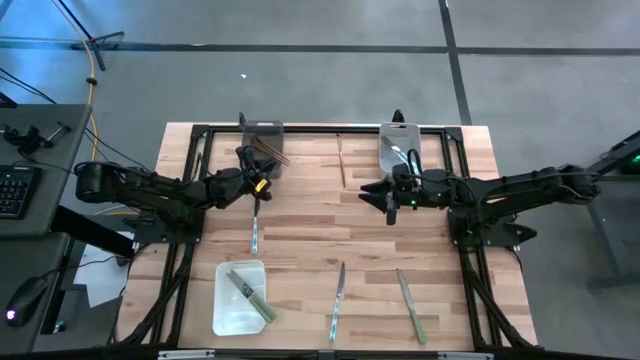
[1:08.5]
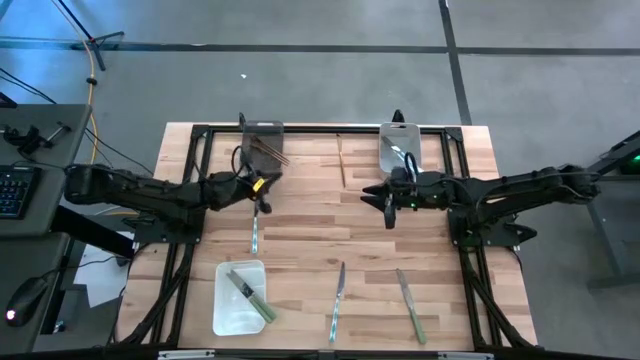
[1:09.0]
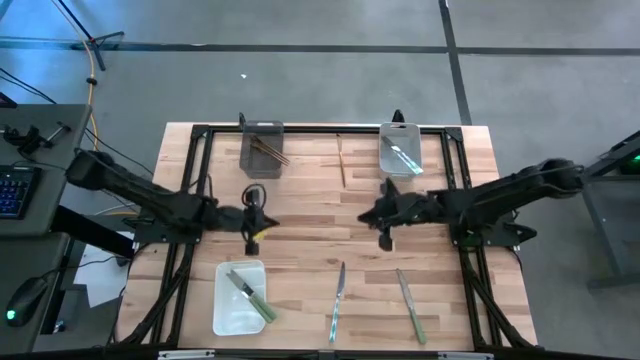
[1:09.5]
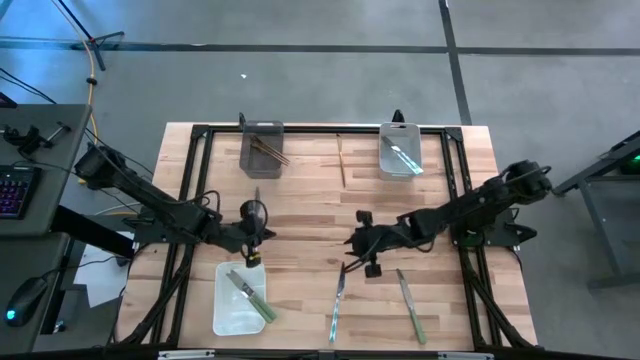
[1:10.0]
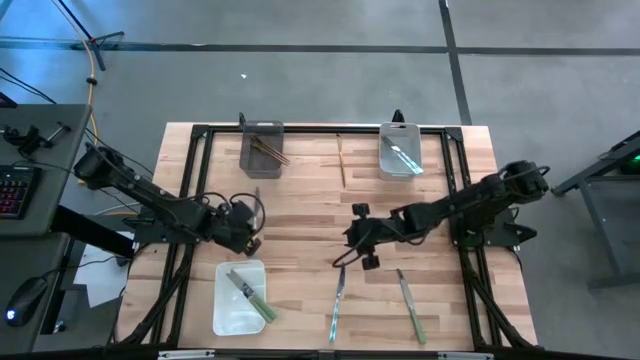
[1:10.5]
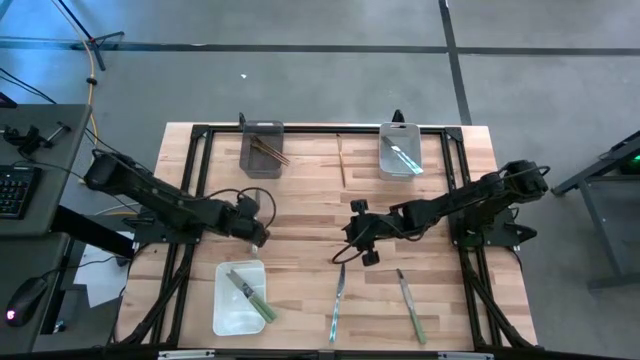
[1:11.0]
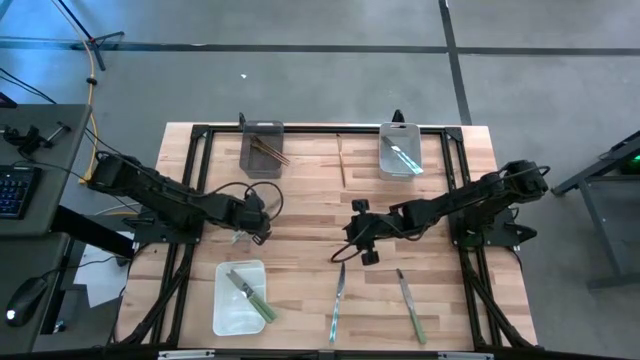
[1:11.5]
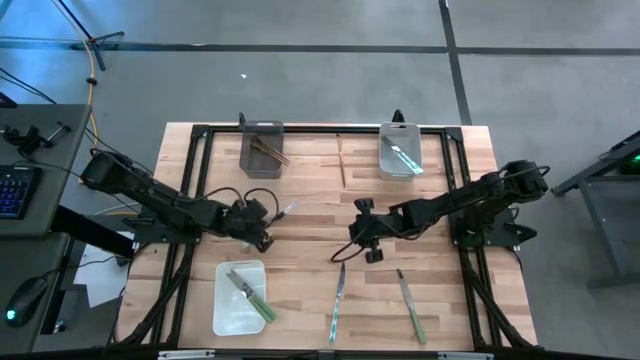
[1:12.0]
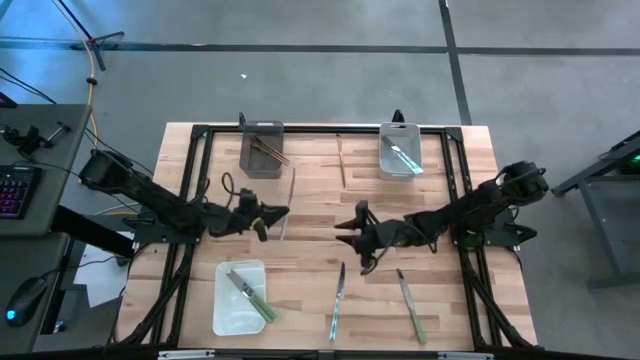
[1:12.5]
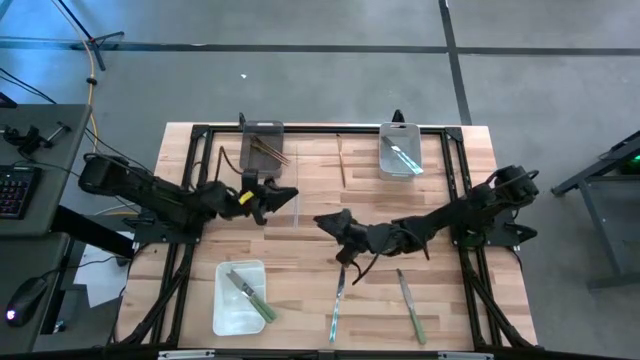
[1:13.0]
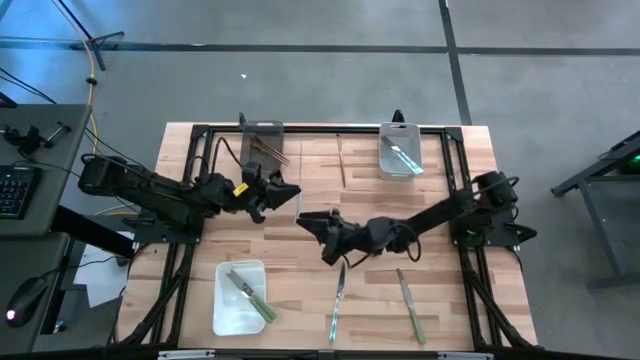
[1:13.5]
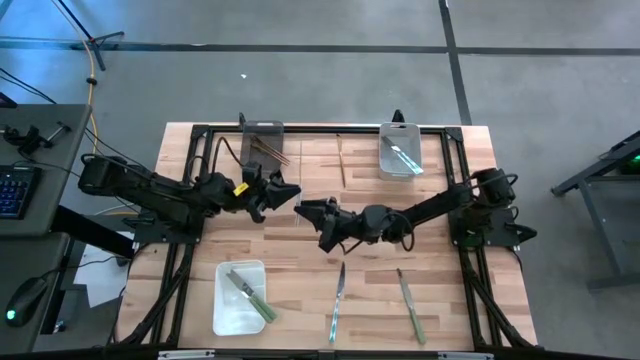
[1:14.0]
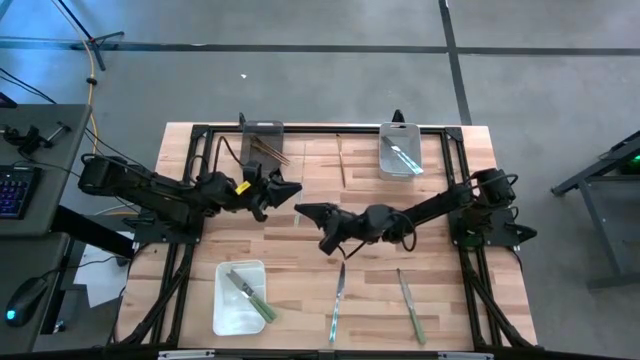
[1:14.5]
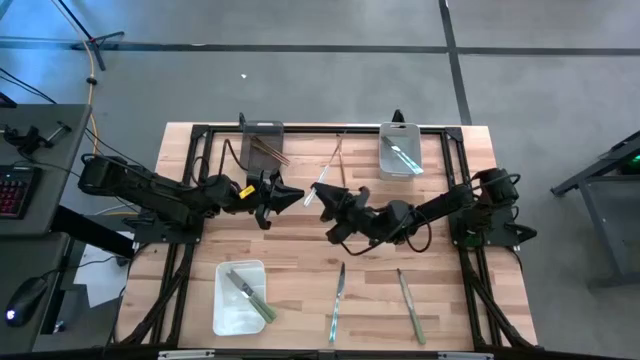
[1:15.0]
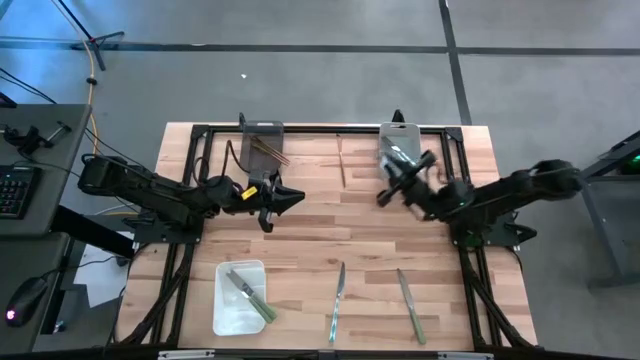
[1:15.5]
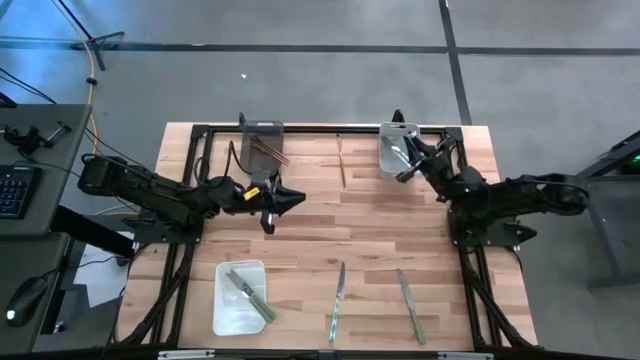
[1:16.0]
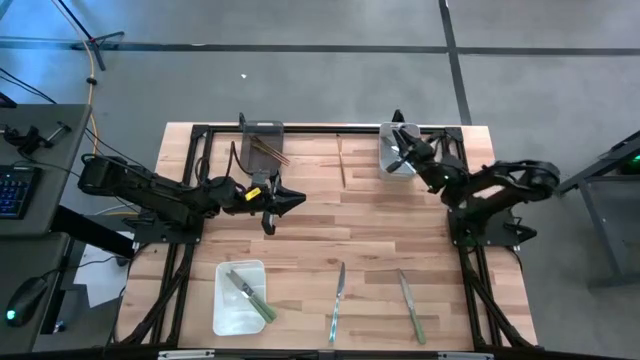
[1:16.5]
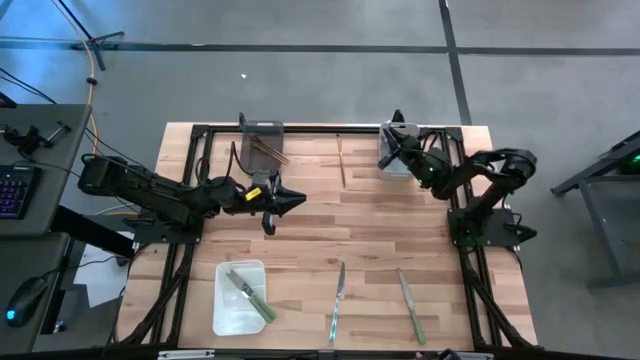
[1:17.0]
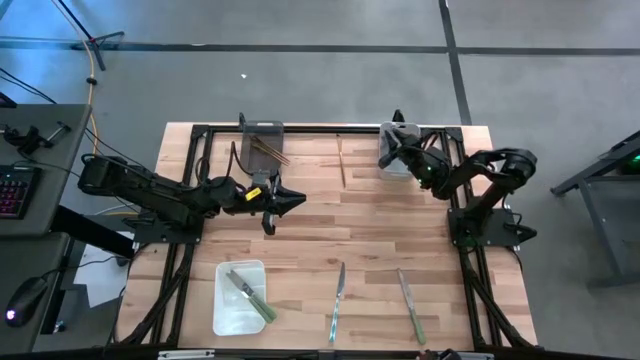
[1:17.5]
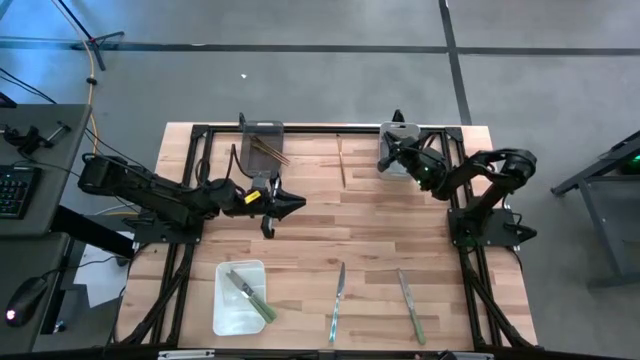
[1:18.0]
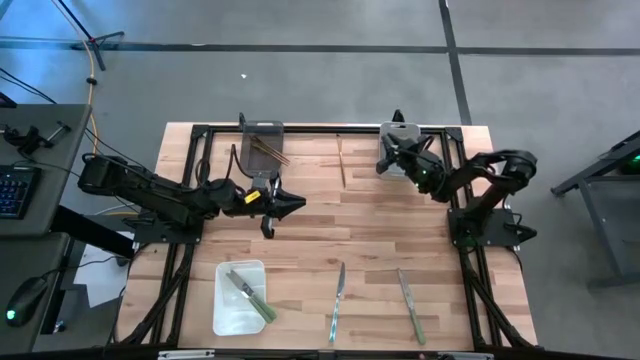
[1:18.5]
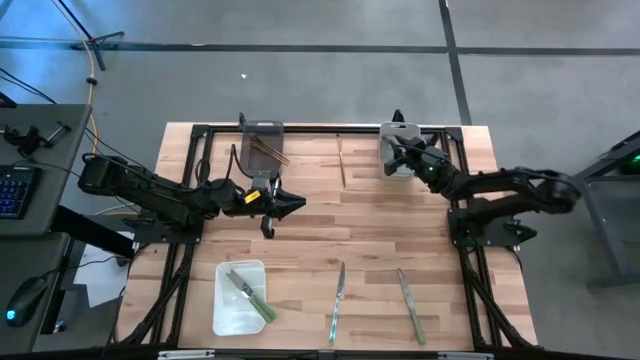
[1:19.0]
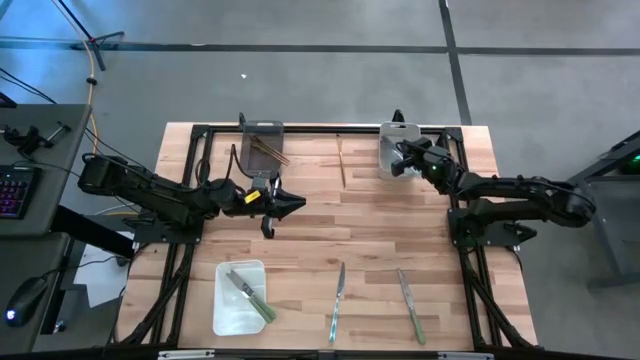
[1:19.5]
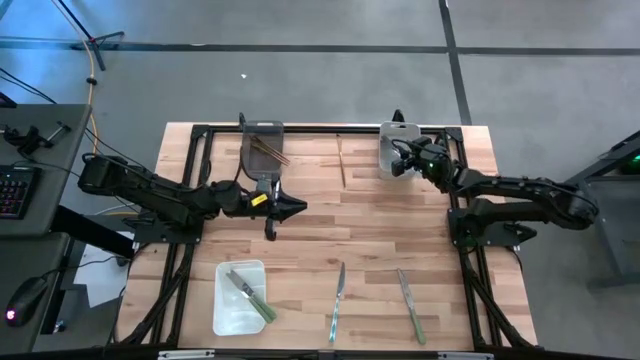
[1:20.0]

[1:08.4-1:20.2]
Task: Sort silverware by color (type)
Put the blue table knife into the gray bin

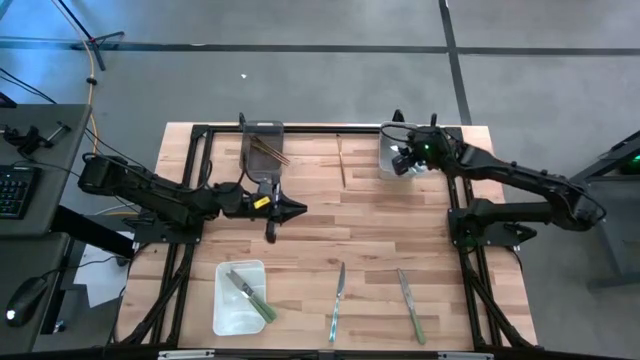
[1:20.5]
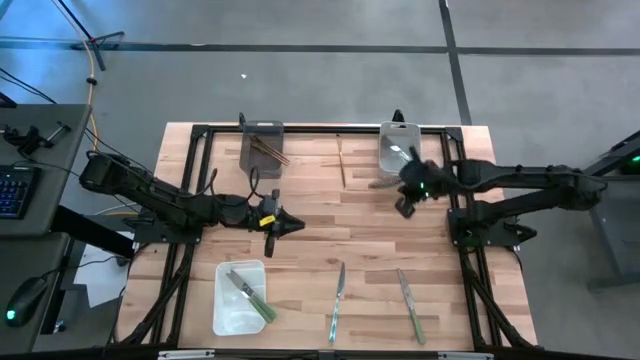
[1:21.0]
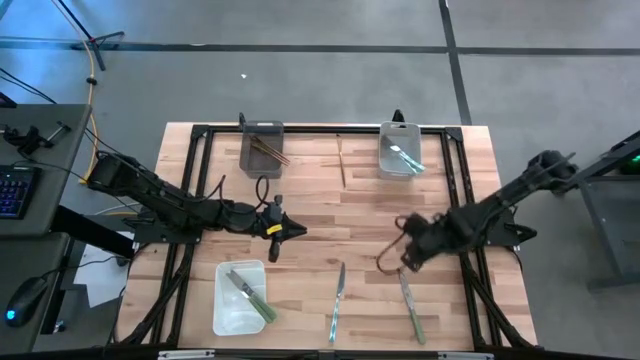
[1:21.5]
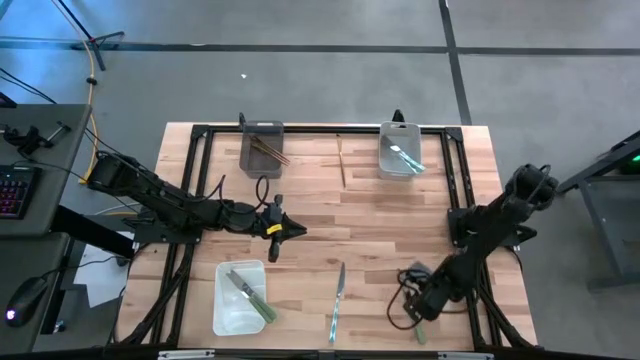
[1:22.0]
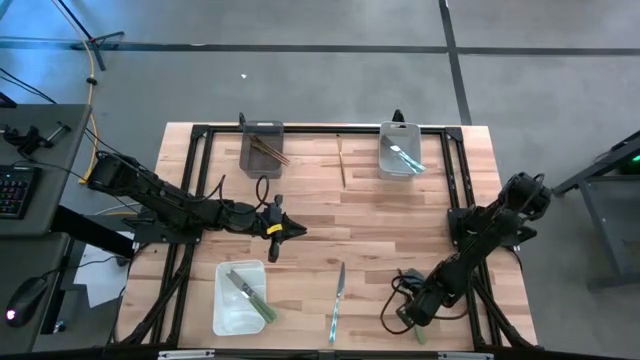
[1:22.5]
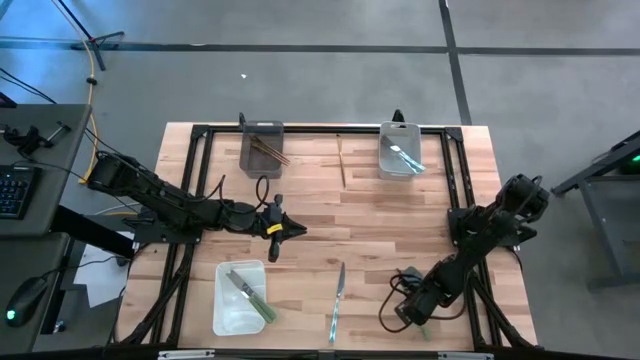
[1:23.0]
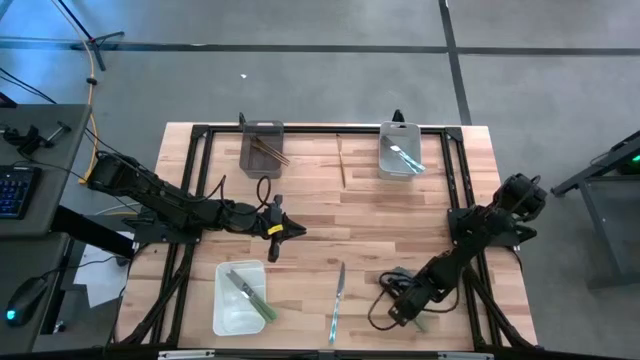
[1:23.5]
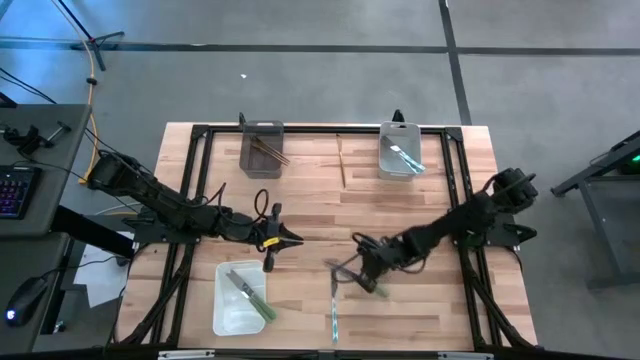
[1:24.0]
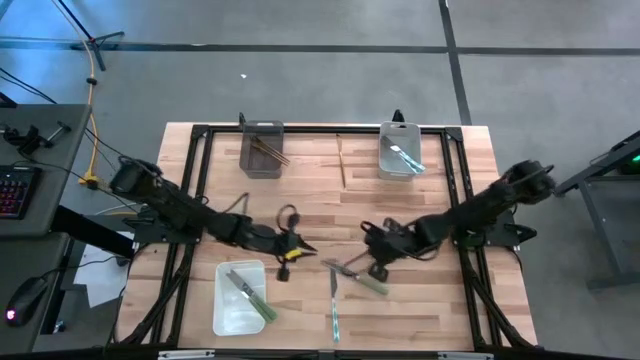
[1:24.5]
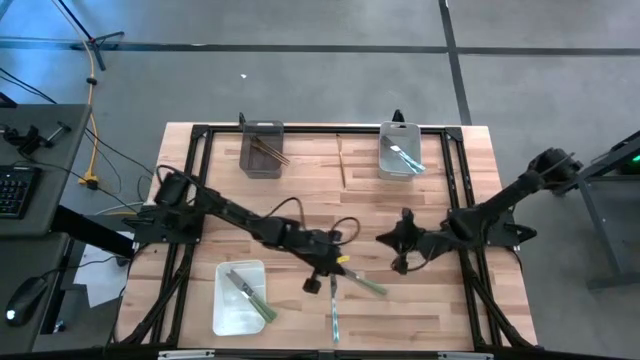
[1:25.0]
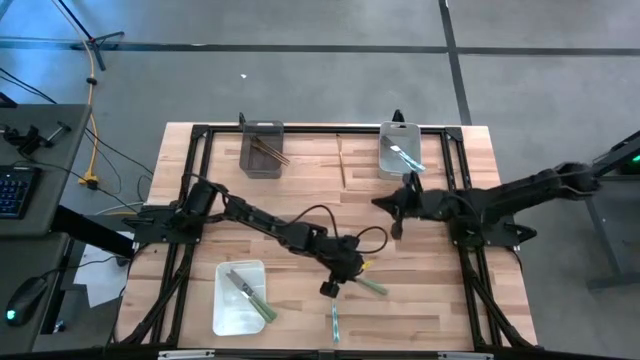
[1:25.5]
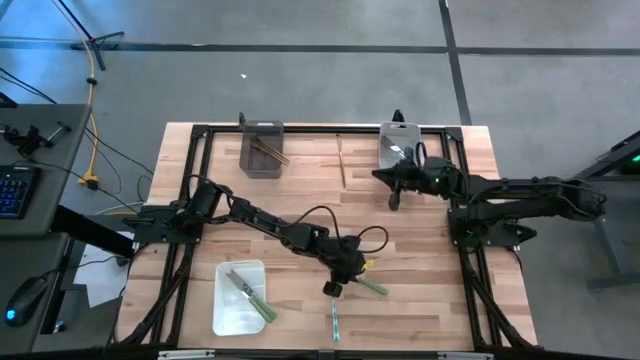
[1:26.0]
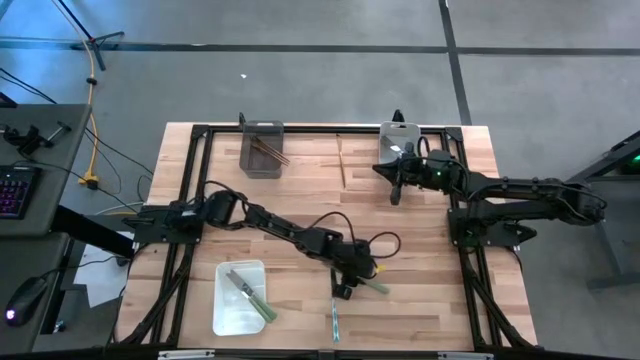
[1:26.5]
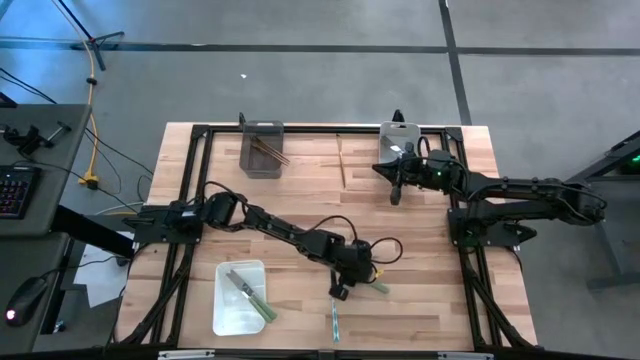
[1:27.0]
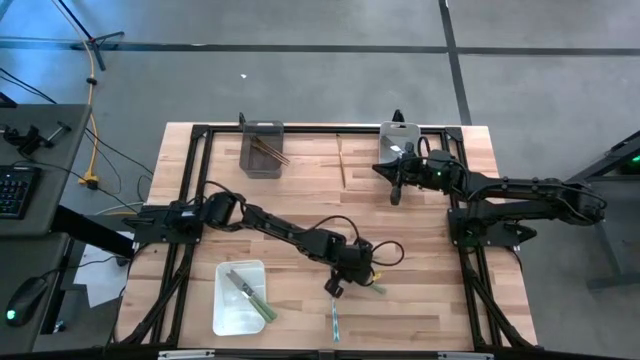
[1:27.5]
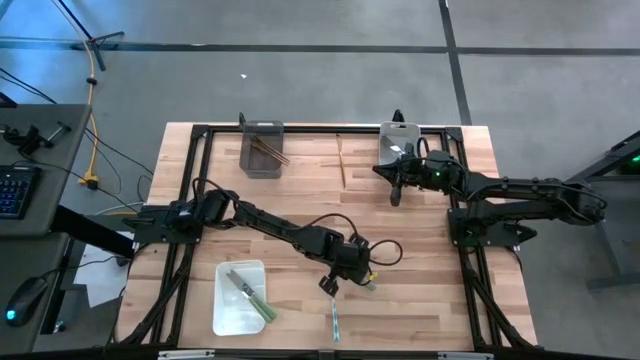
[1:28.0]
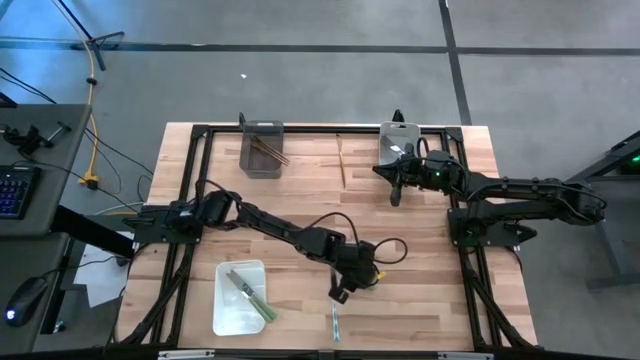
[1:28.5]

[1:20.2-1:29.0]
Put the green table knife into the white bin

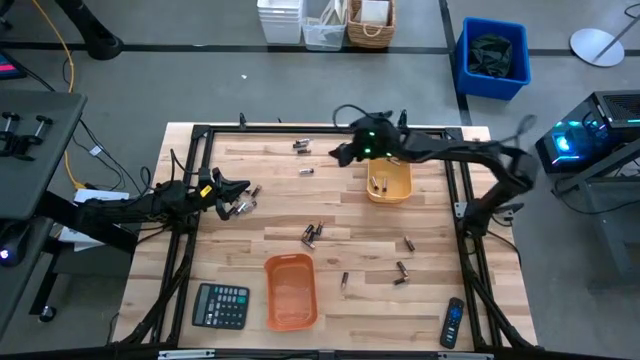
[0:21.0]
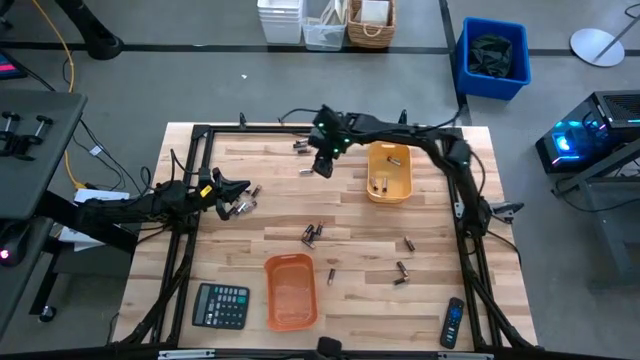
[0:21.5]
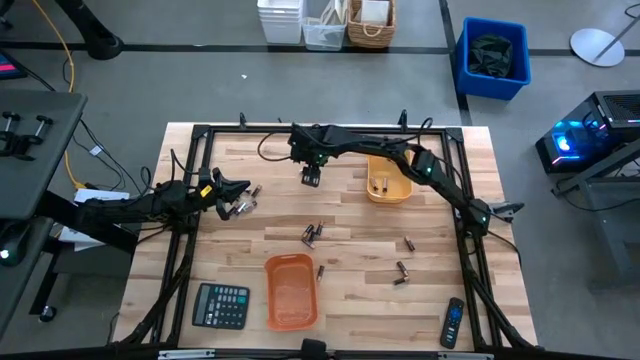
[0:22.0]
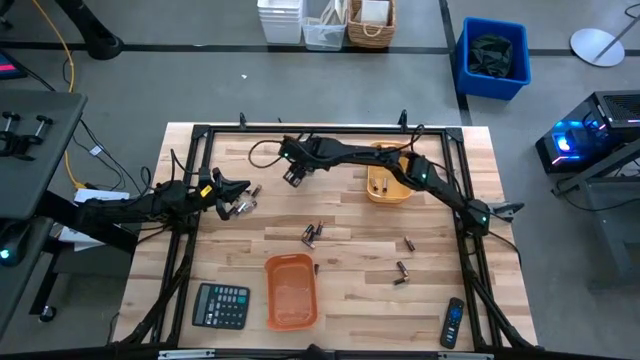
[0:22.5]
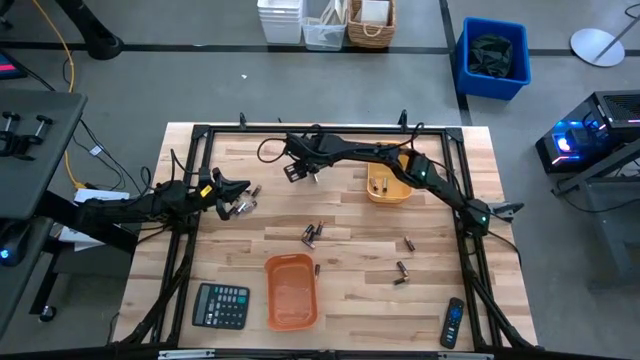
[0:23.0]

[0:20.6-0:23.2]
Task: Sort batteries
Put the silver battery into the yellow bin
